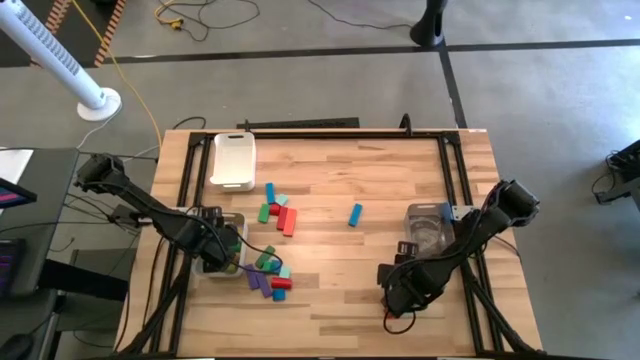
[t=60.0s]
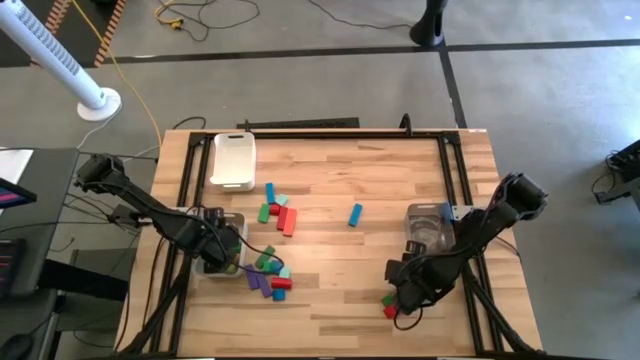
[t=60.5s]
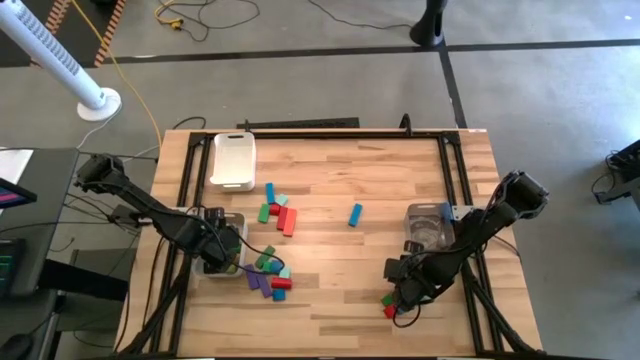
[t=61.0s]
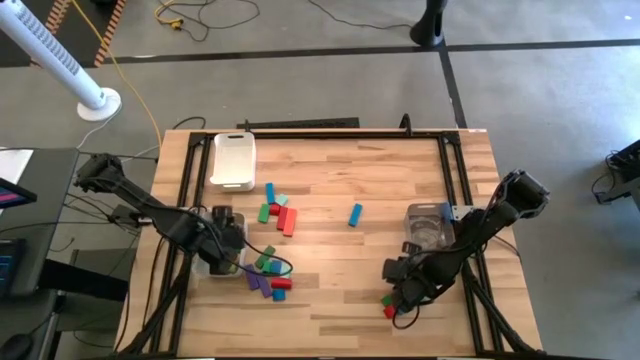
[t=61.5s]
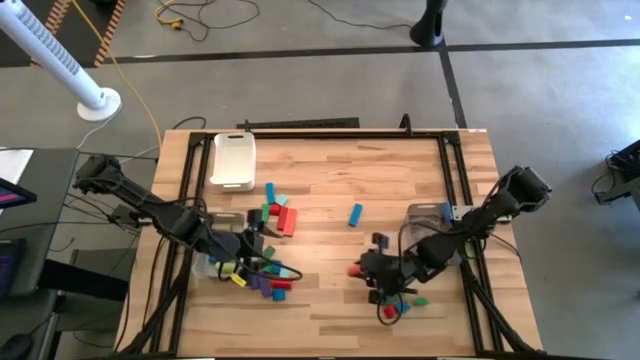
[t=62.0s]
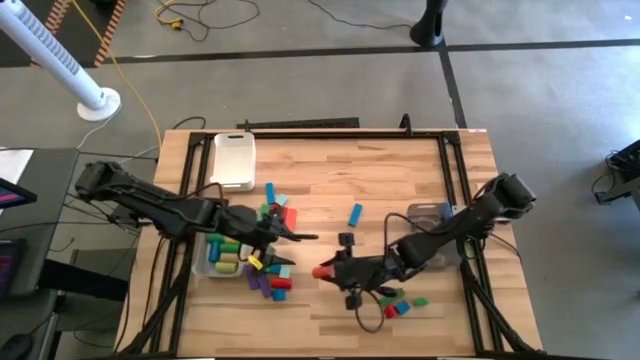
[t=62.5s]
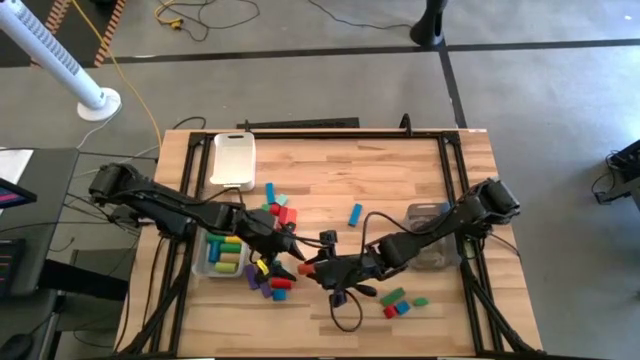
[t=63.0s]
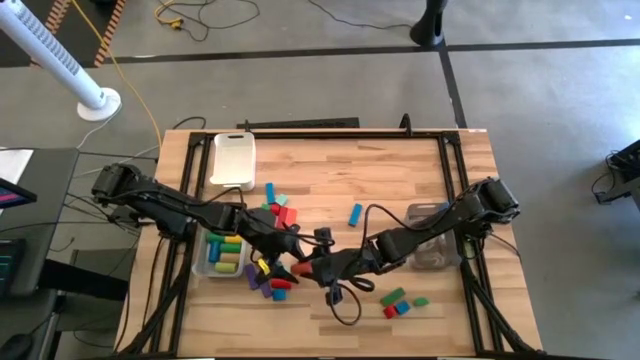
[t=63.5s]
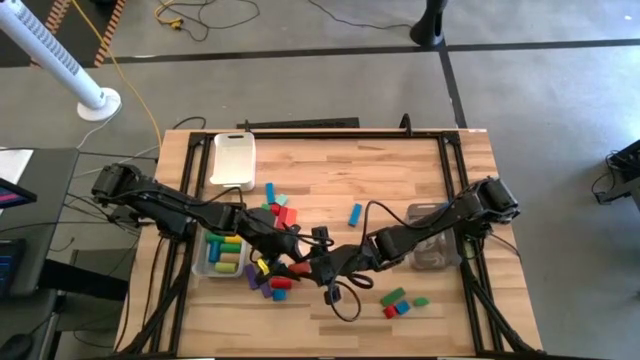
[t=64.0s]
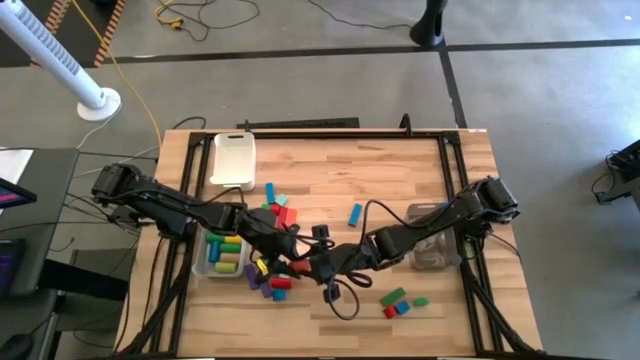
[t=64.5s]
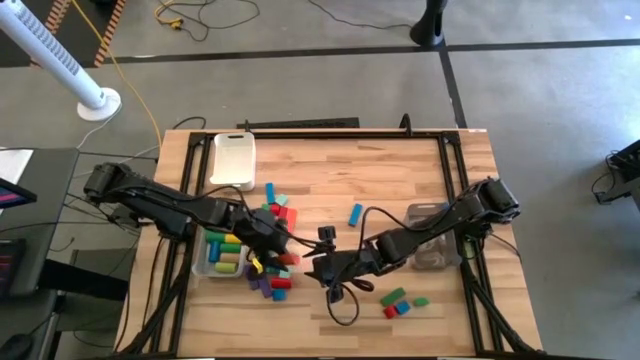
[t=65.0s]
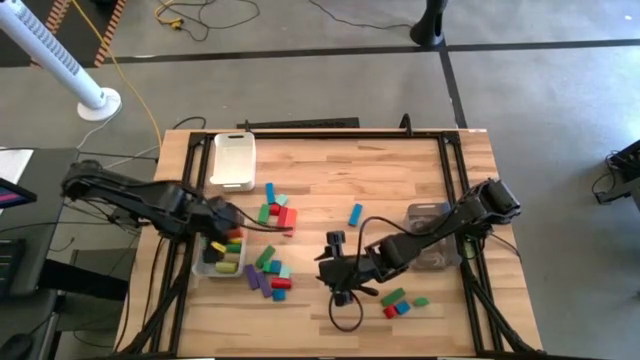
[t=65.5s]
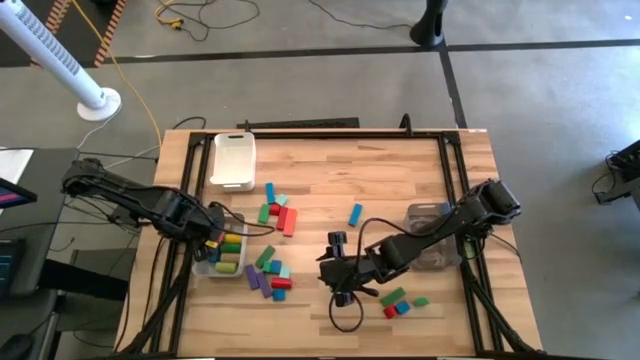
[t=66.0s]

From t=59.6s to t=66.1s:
Task: Sort blocks by size
Put the orange cylindrical block into the gray bin

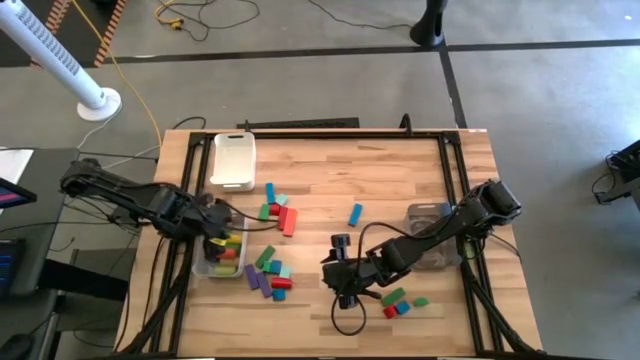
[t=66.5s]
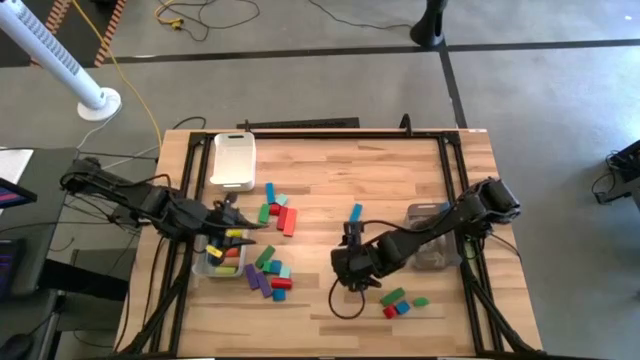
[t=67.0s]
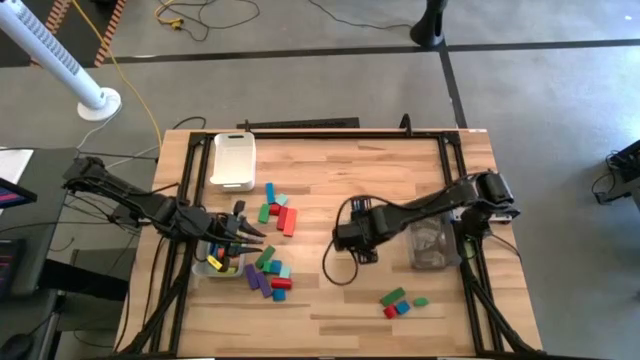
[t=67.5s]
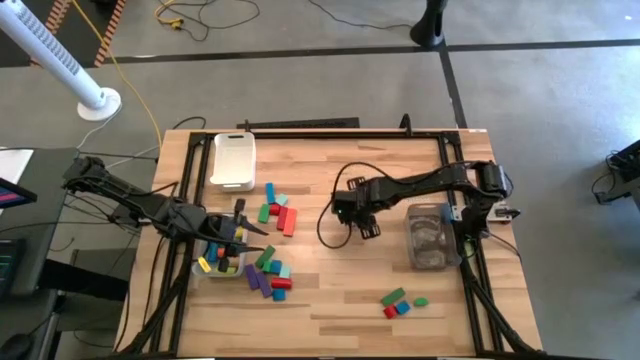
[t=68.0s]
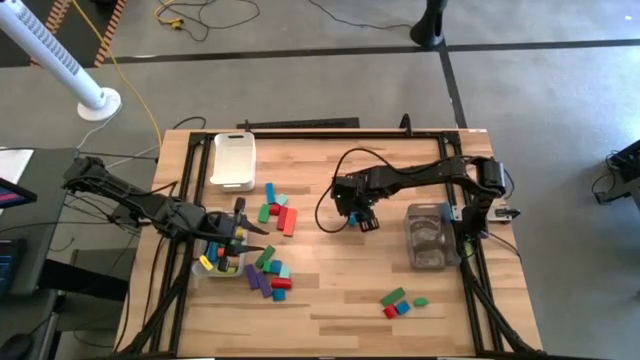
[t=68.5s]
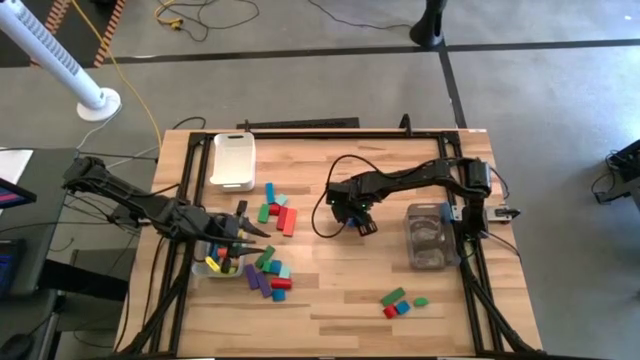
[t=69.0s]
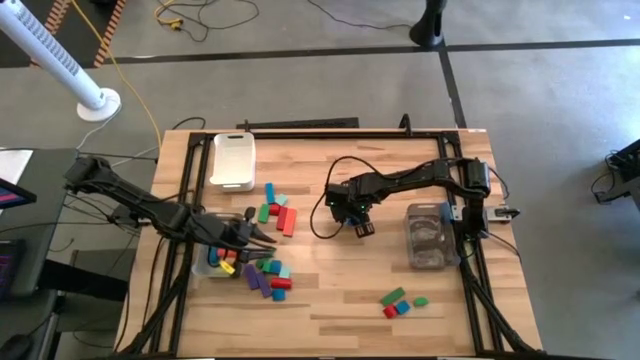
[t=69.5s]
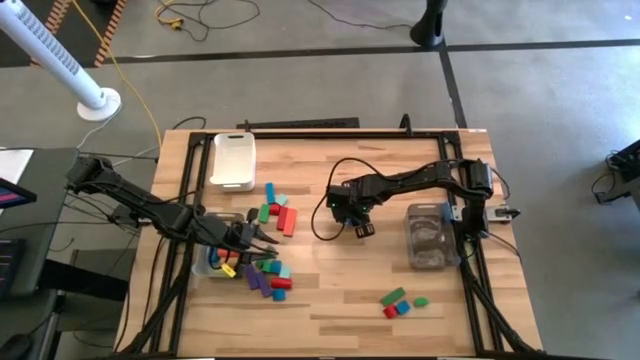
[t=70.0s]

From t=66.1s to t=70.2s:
Put the blue rectangular block into the black bin

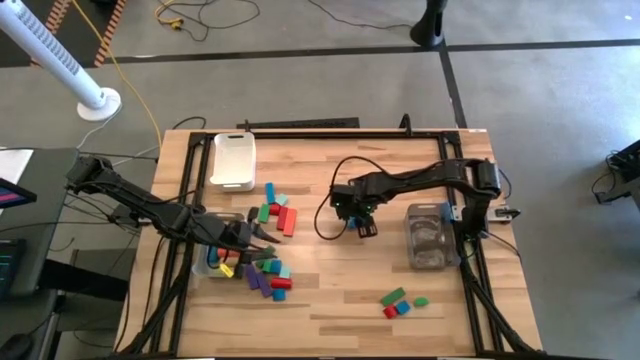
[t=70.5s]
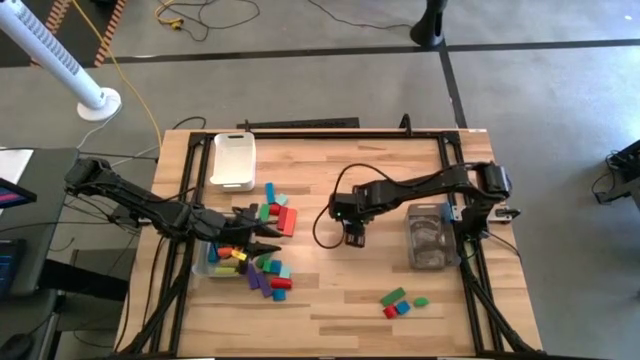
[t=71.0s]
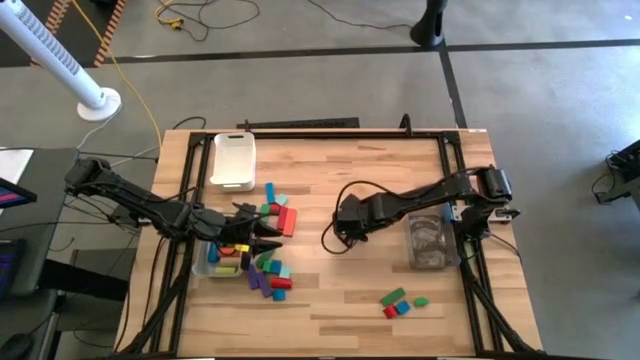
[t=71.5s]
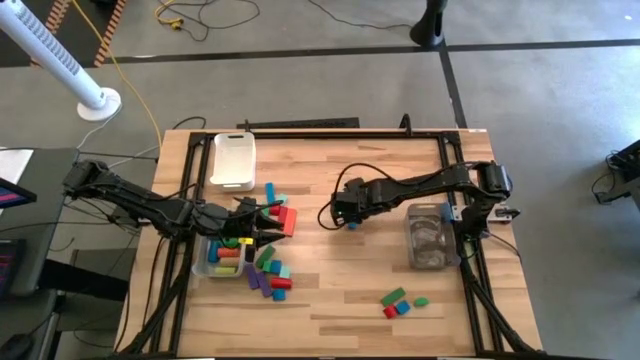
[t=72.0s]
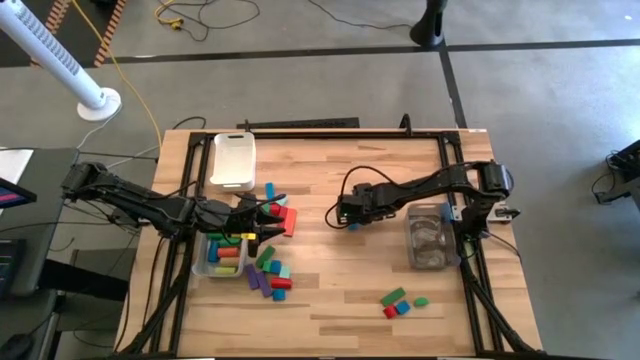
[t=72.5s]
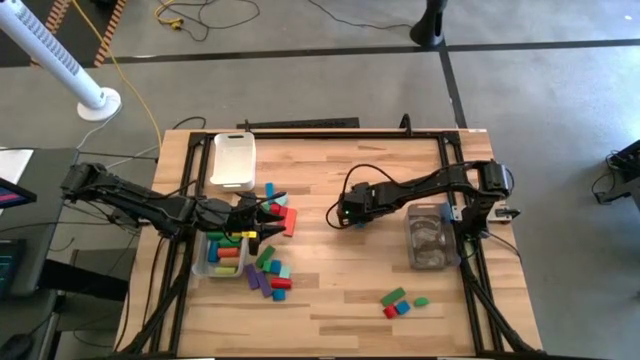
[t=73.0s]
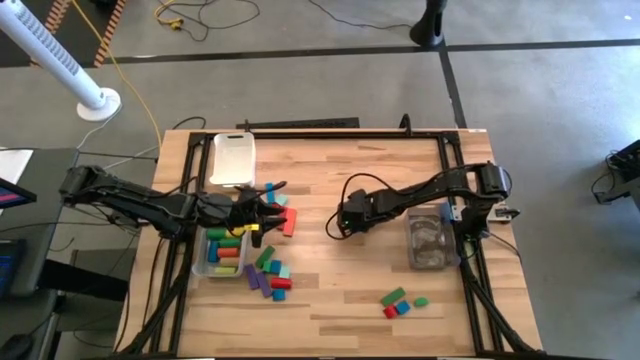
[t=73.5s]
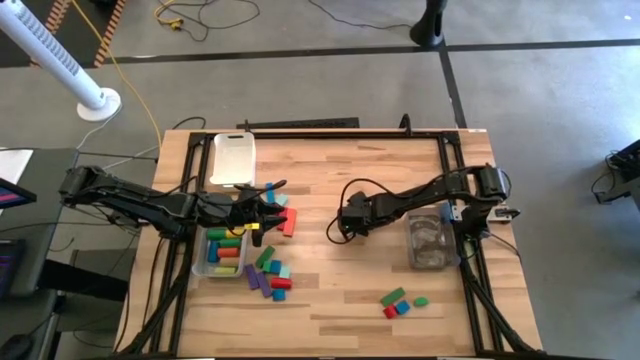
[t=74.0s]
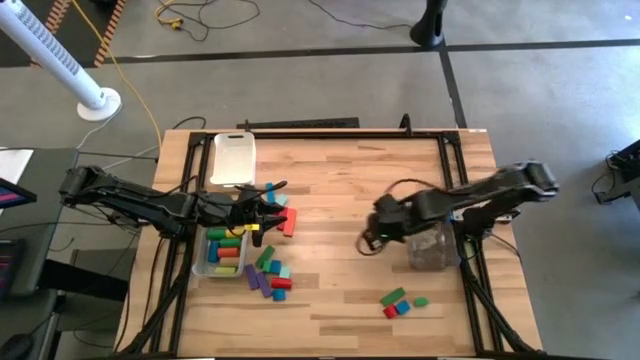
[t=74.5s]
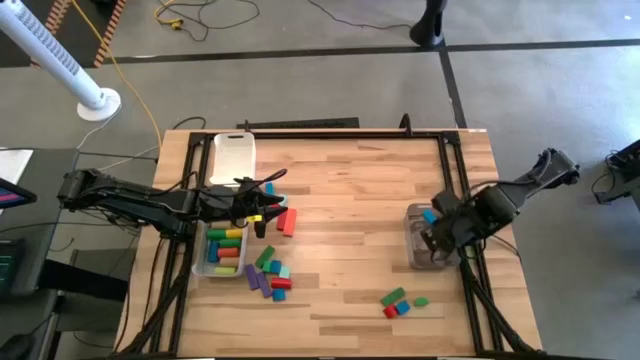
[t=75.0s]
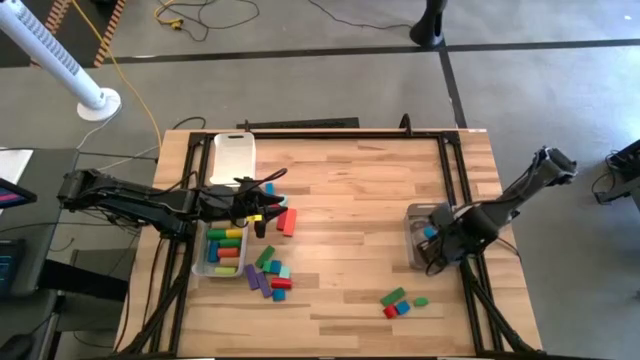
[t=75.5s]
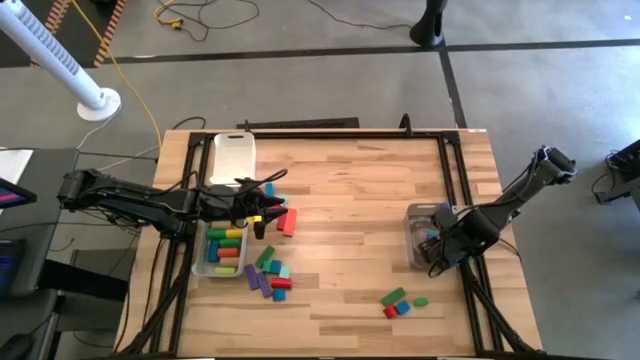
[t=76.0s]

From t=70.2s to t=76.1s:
Put the blue rectangular block into the black bin

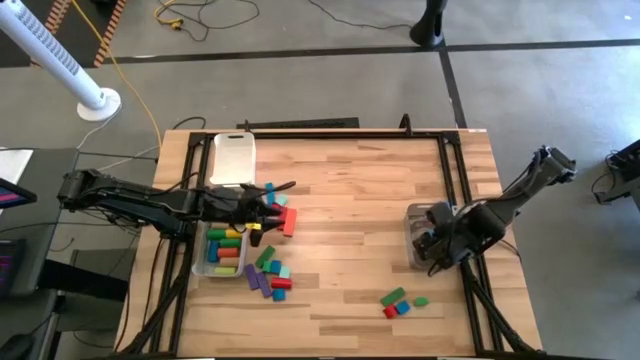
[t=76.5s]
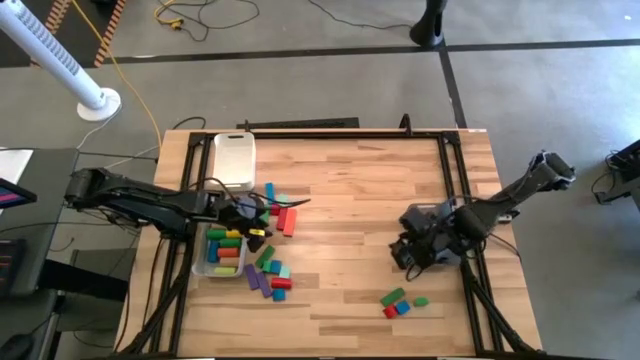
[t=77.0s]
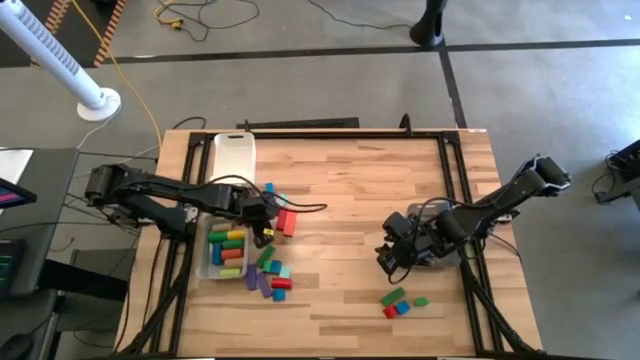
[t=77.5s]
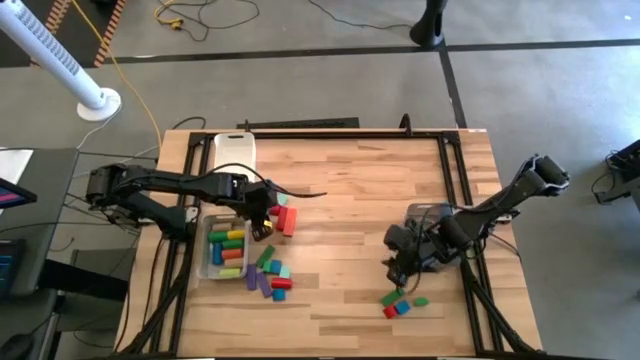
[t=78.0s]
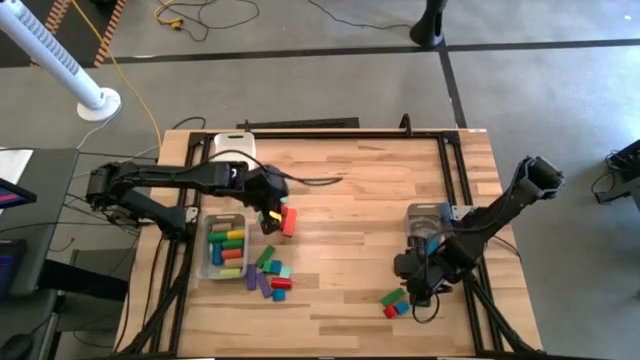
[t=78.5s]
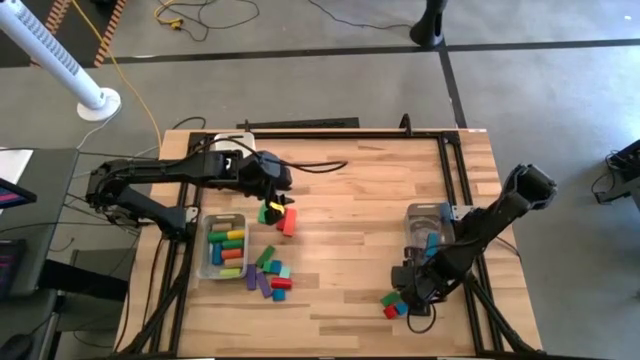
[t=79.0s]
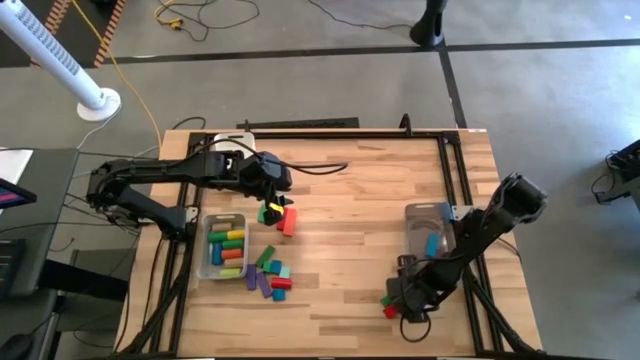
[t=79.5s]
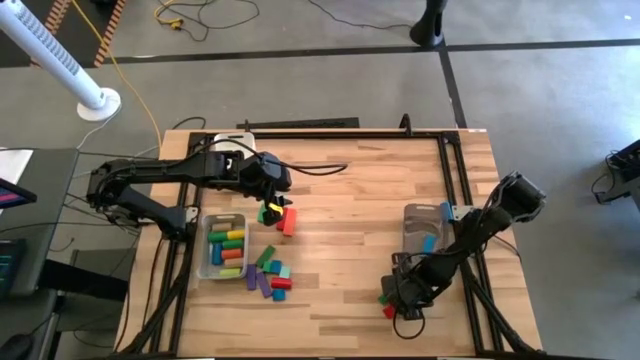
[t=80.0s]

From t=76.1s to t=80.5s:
Put the dark green rectangular block into the black bin
